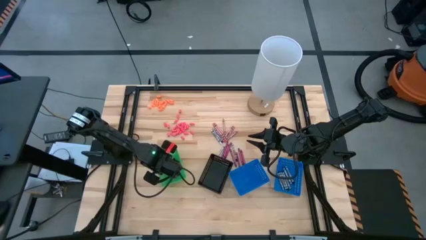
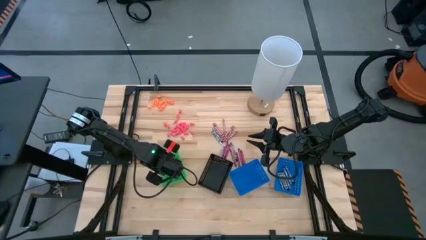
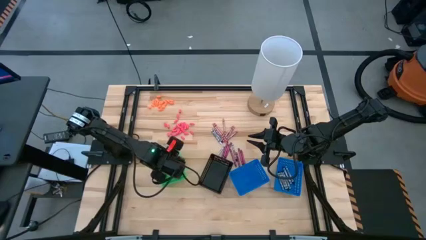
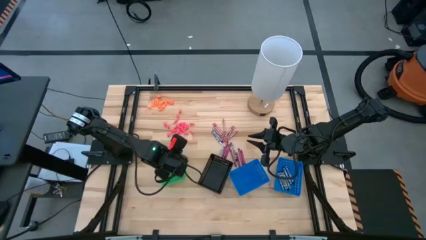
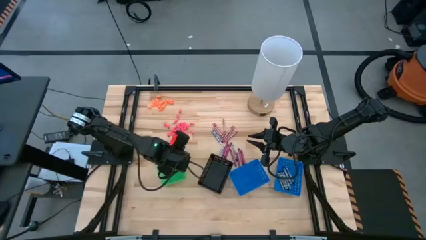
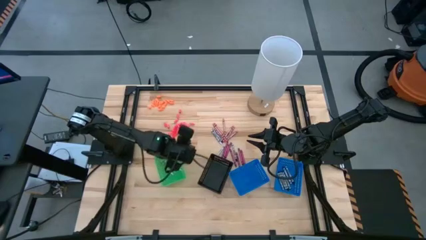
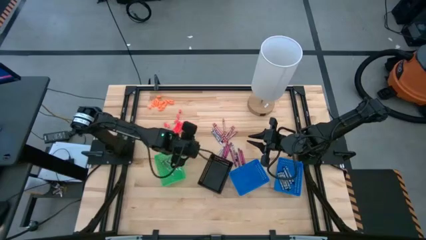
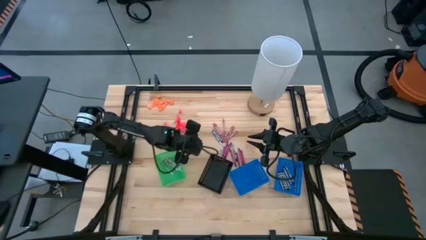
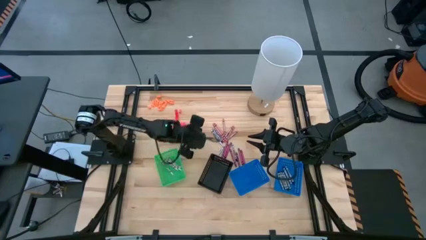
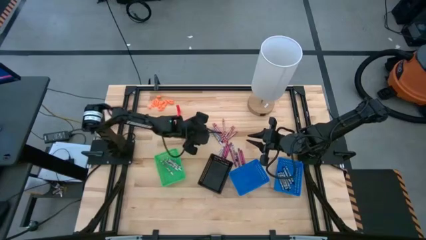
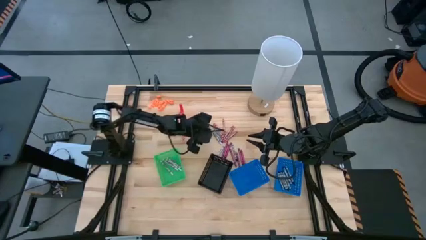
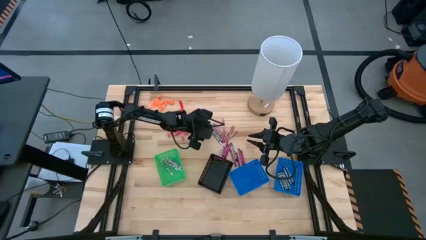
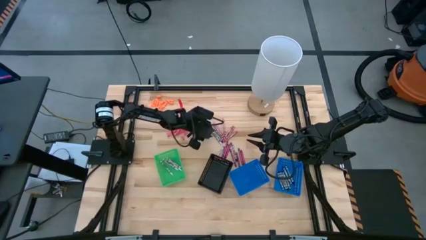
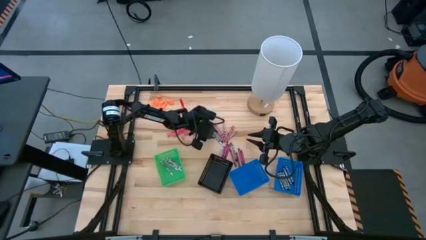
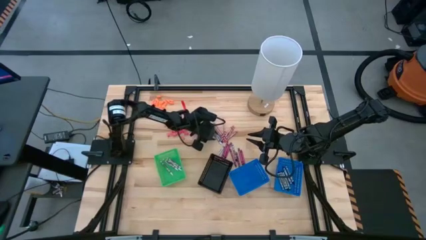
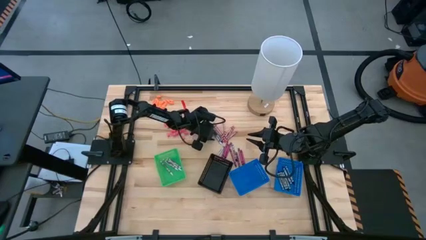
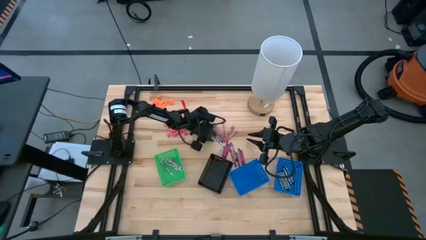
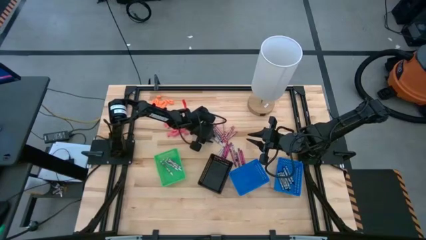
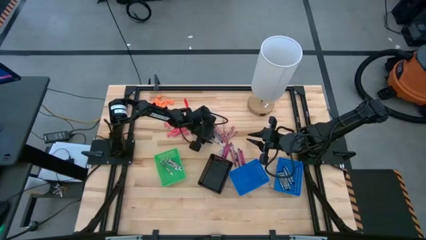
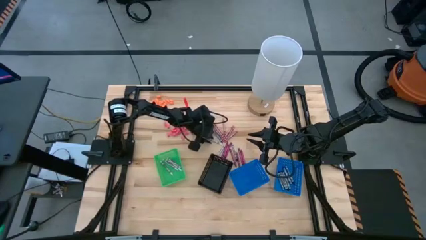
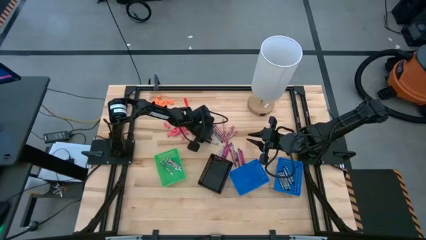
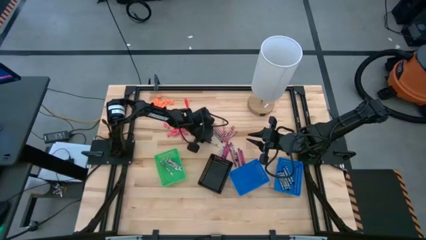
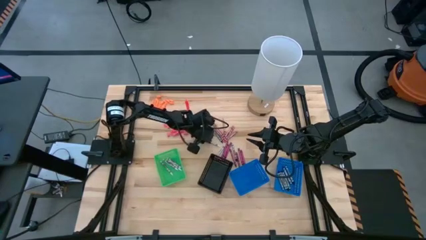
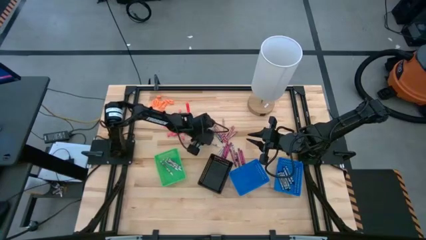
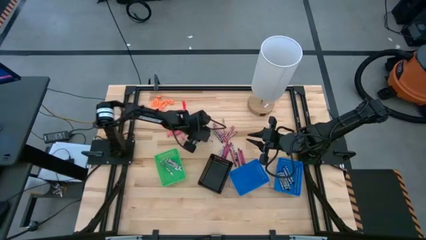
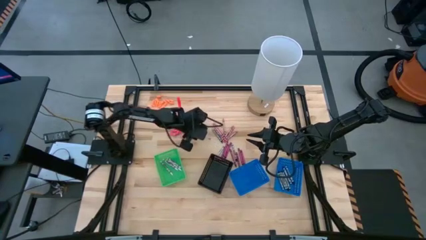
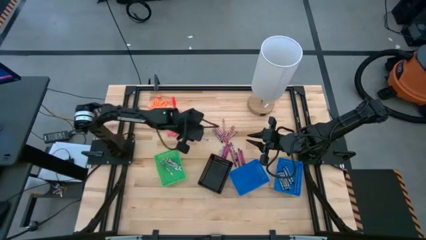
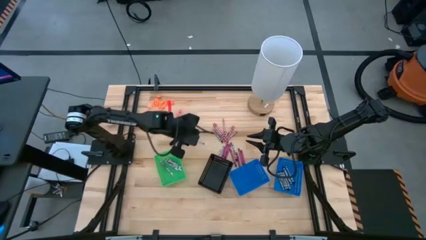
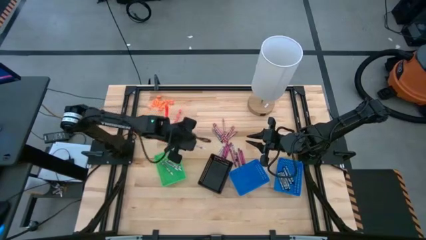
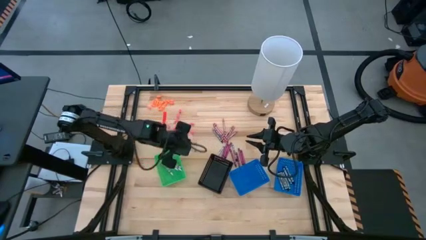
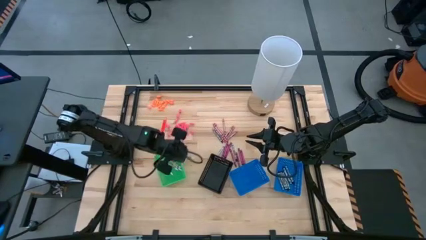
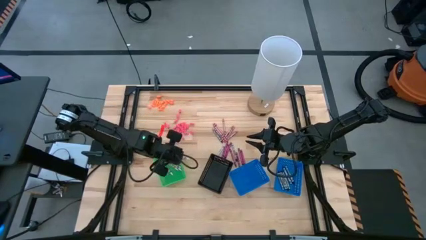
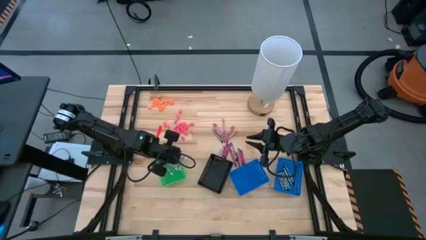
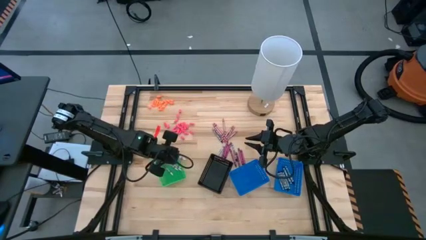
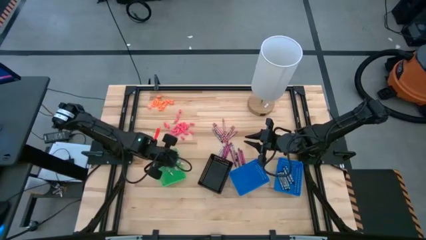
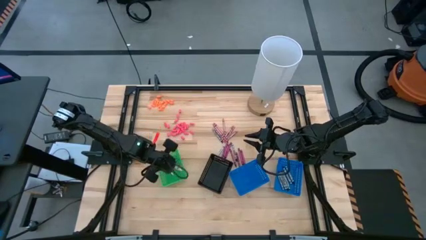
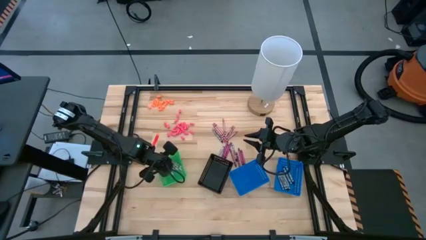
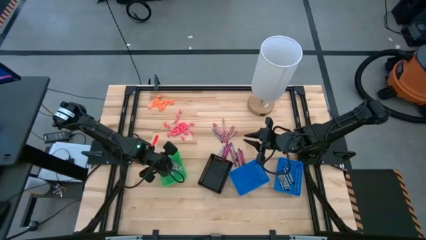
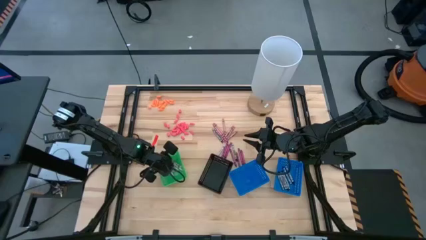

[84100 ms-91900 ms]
Task: Sort crayons
Put the white crayon into the green bin

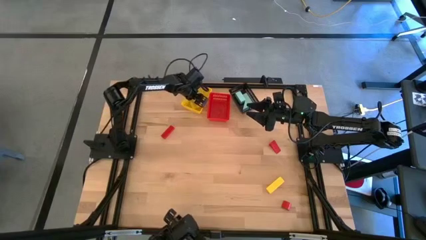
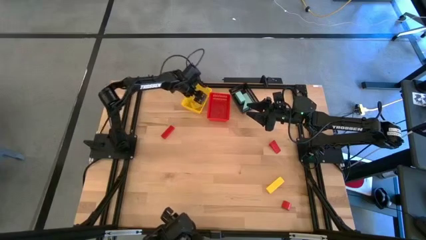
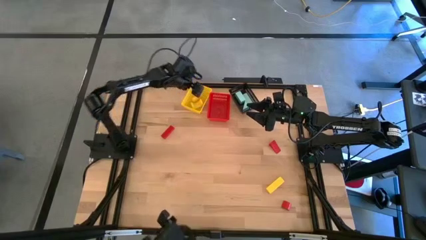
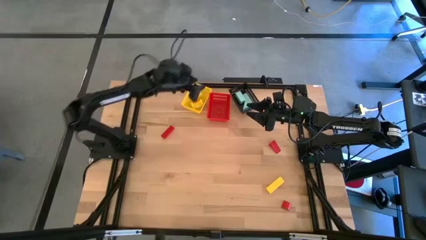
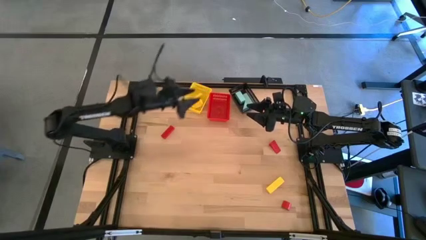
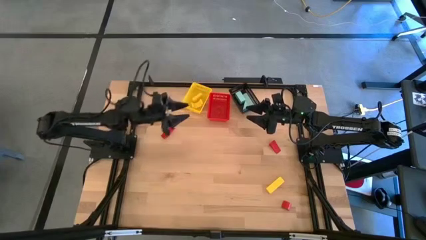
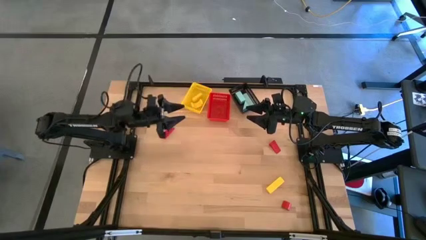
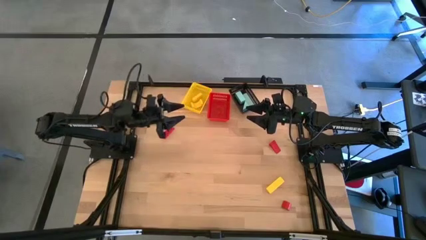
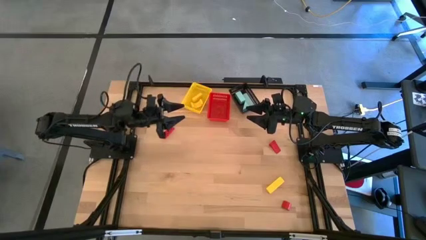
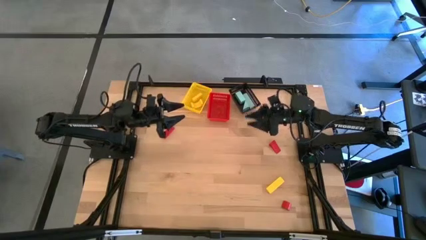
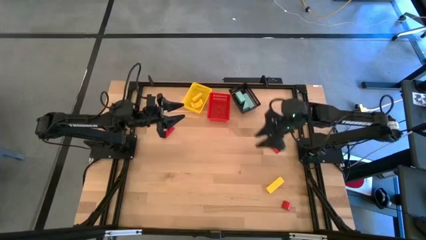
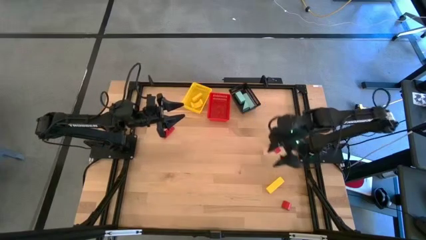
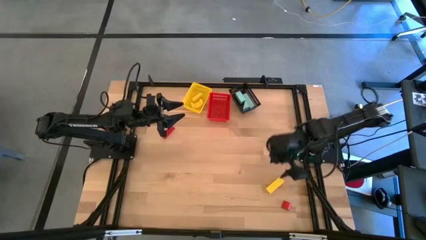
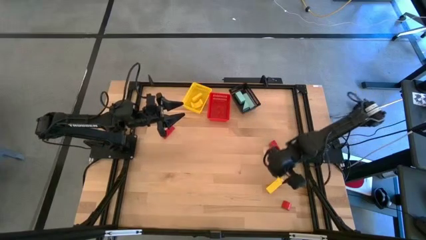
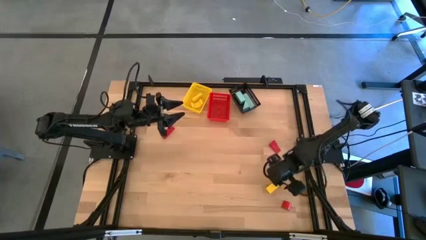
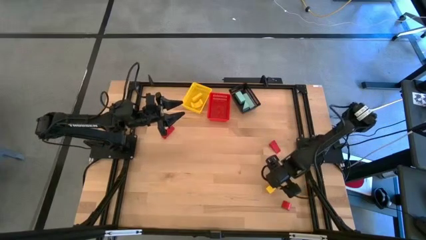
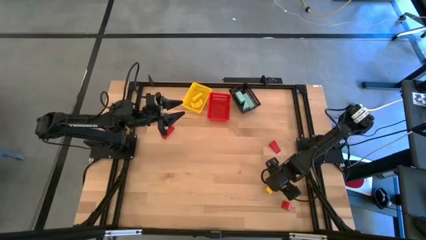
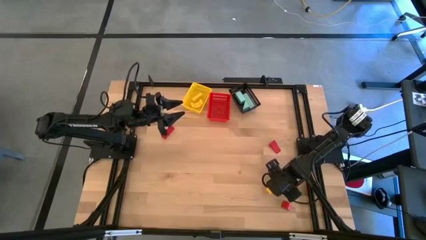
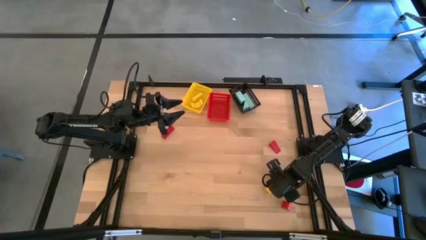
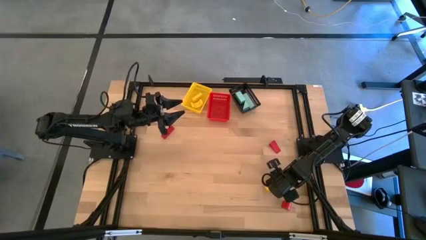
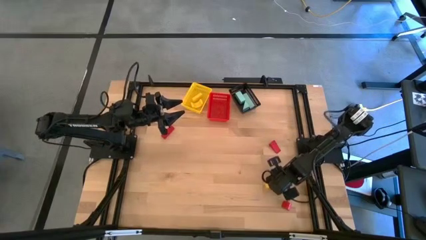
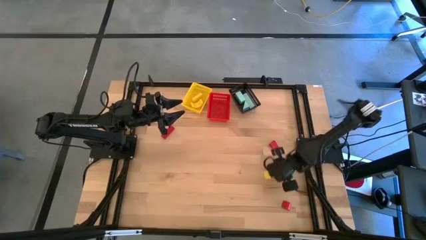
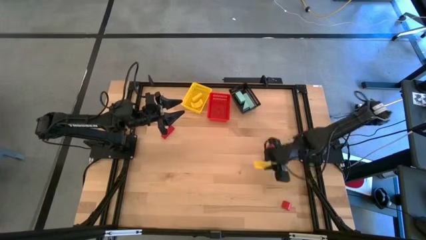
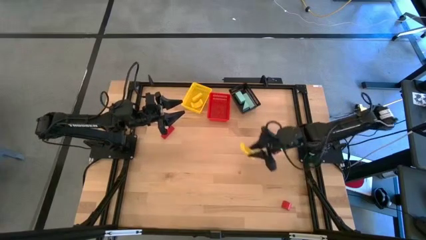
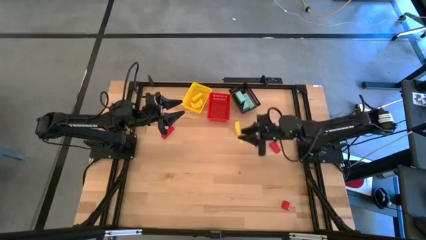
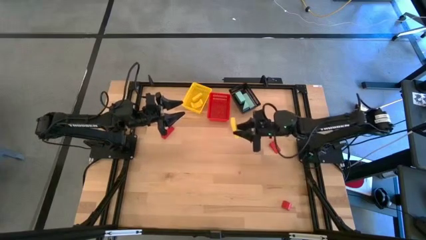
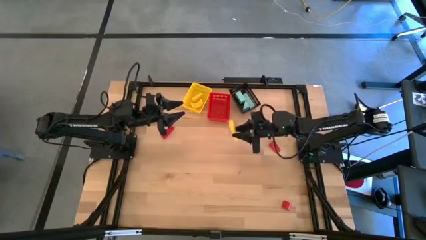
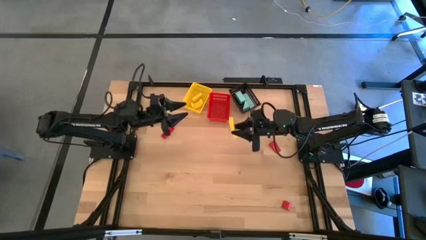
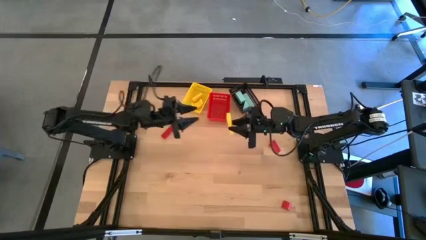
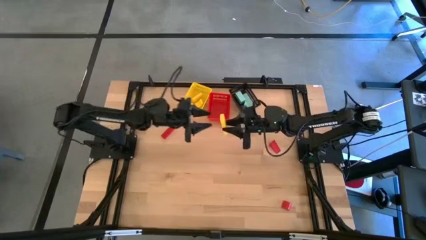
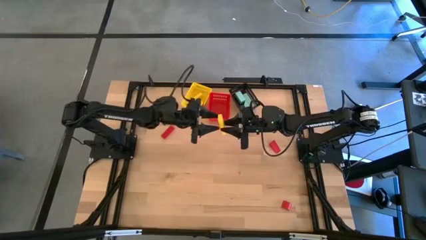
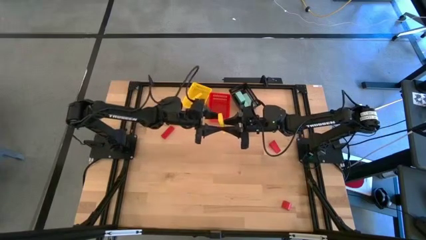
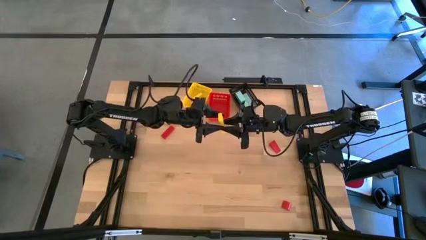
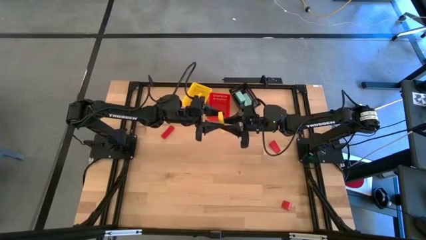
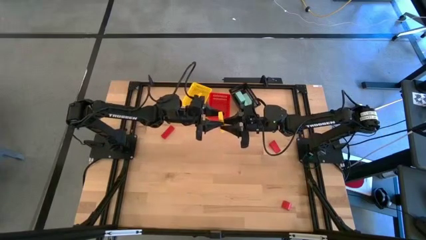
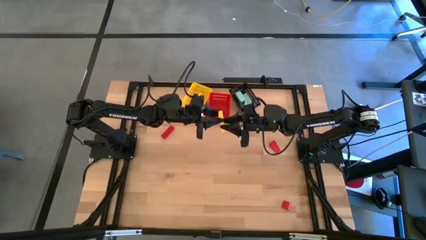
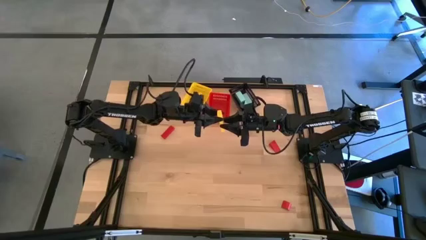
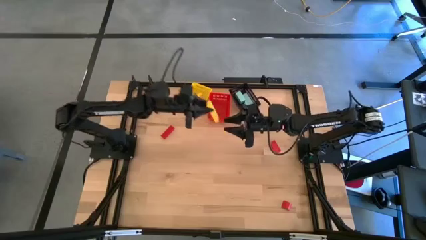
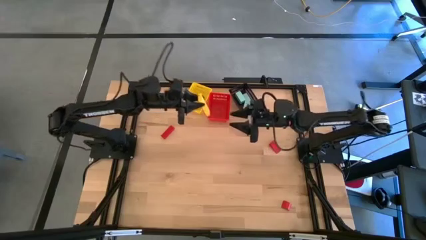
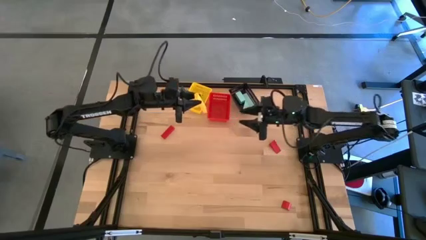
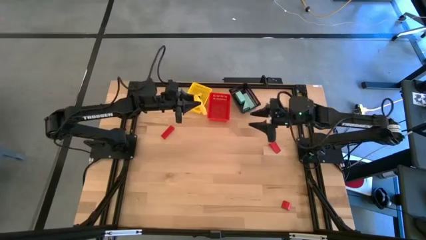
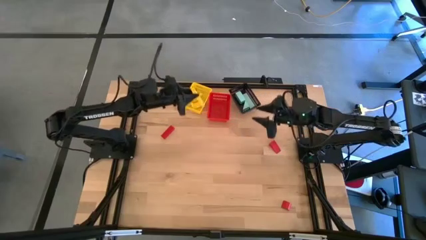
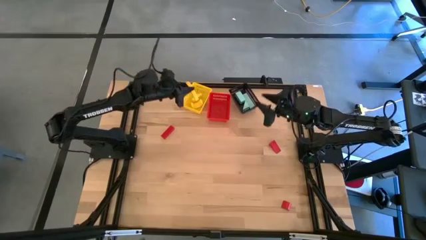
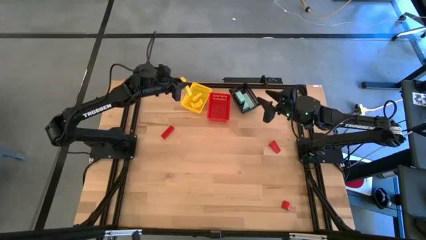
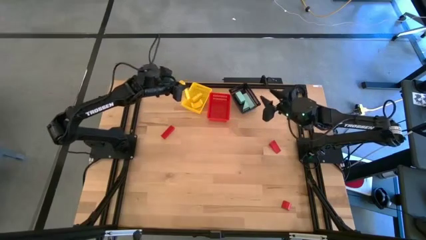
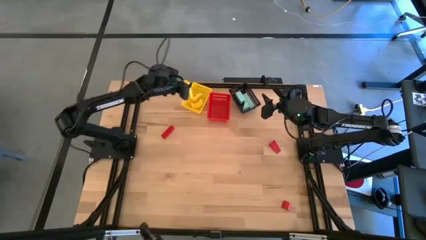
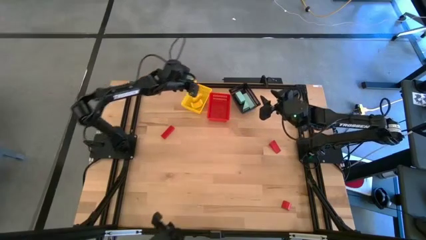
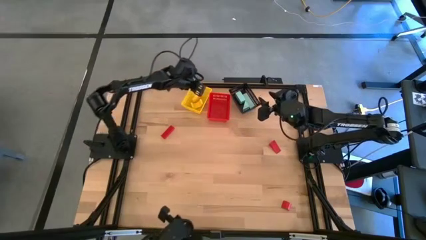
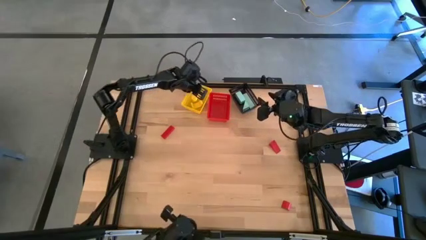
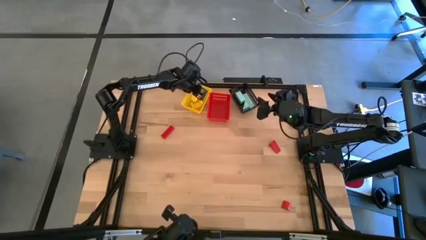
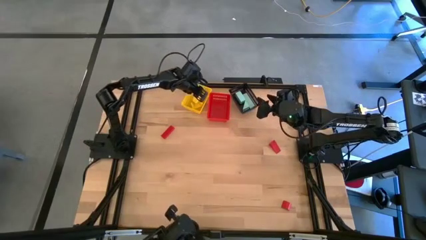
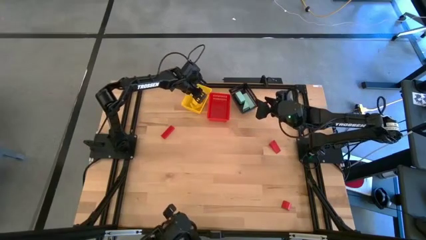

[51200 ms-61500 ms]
Task: Sort & place blocks by color
Put the yellow block into the yellow bin
